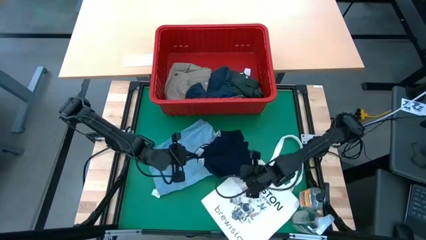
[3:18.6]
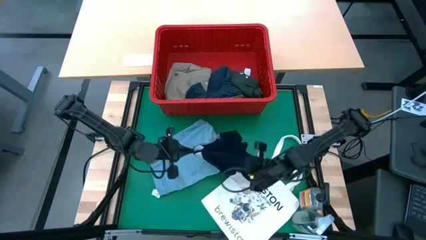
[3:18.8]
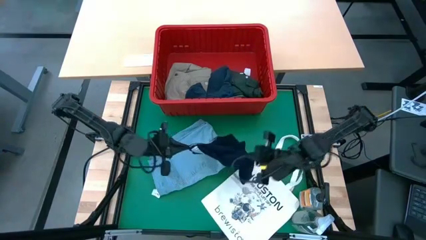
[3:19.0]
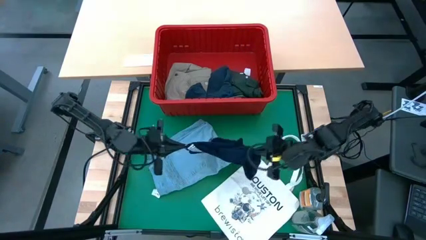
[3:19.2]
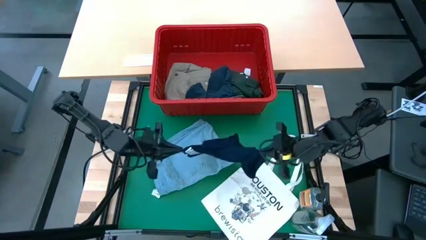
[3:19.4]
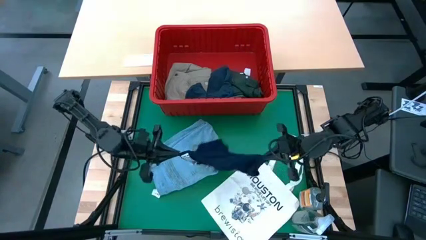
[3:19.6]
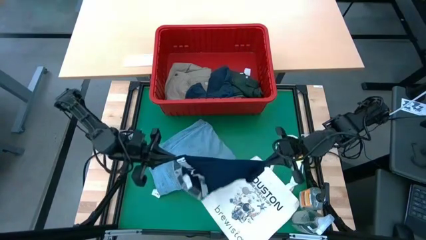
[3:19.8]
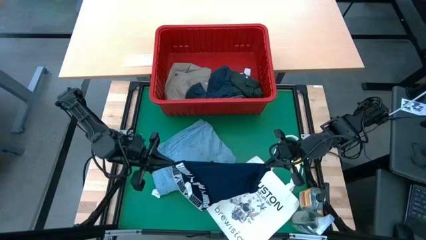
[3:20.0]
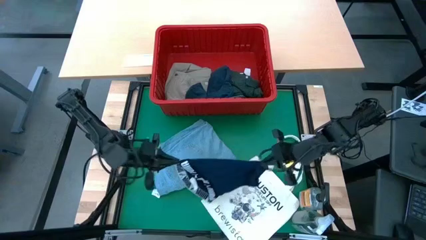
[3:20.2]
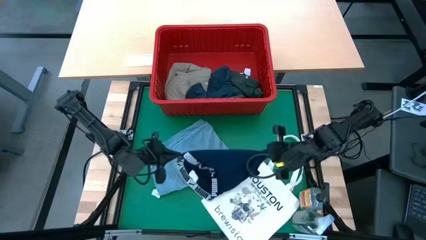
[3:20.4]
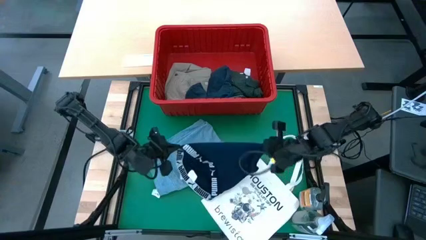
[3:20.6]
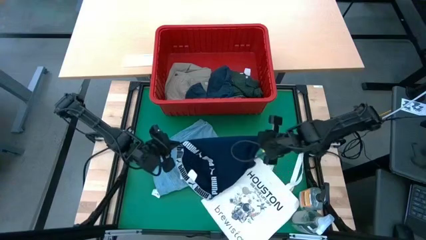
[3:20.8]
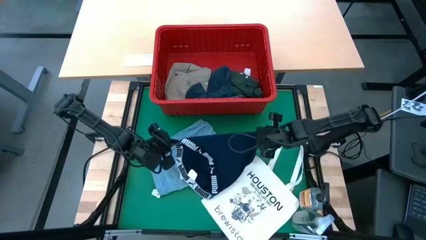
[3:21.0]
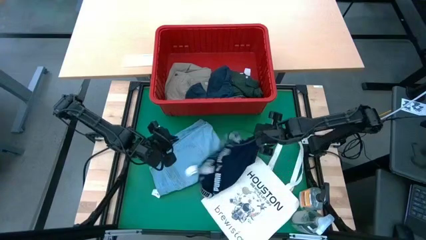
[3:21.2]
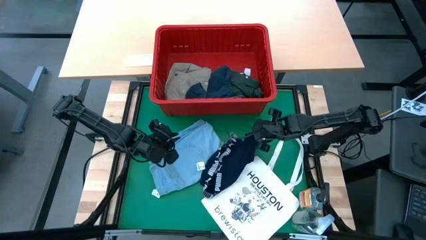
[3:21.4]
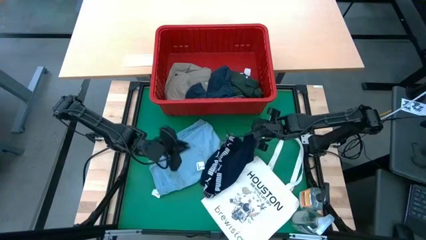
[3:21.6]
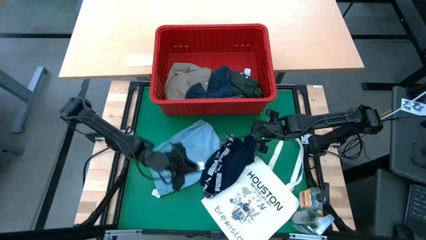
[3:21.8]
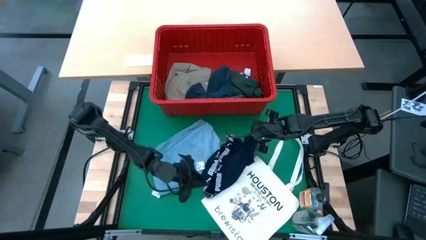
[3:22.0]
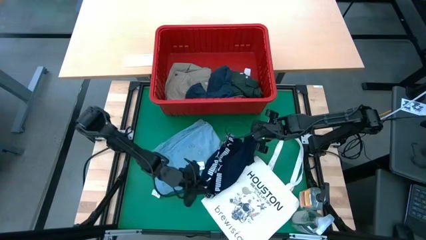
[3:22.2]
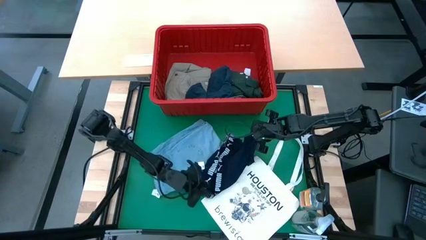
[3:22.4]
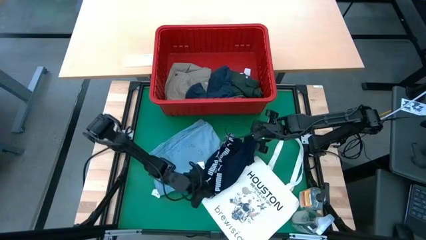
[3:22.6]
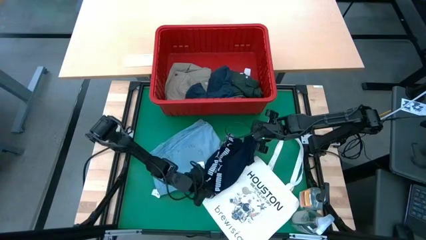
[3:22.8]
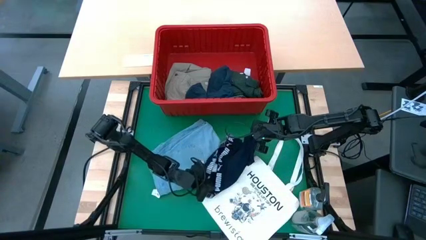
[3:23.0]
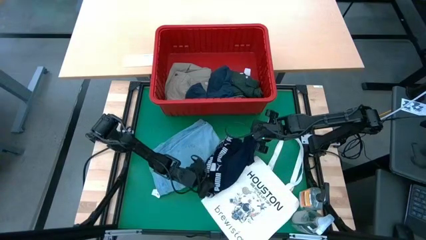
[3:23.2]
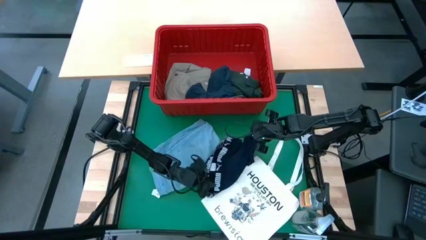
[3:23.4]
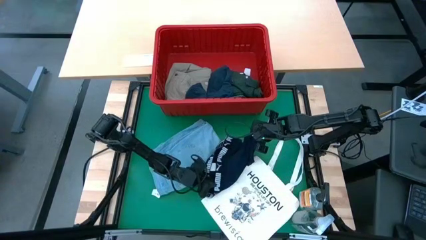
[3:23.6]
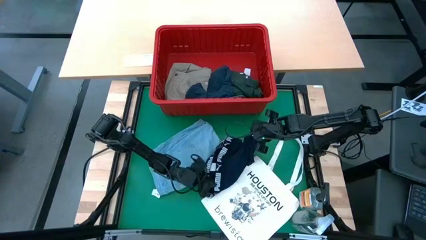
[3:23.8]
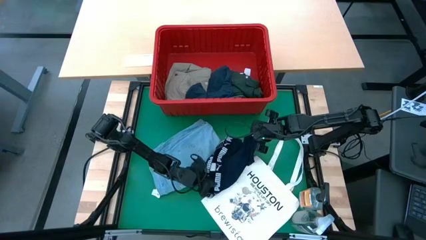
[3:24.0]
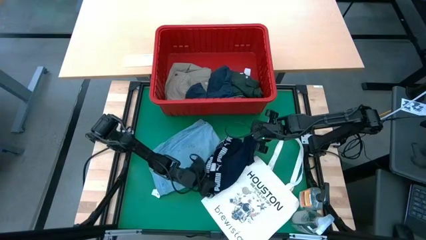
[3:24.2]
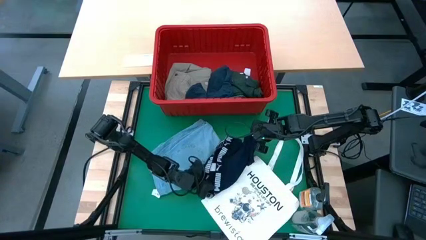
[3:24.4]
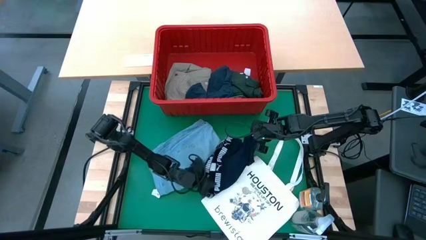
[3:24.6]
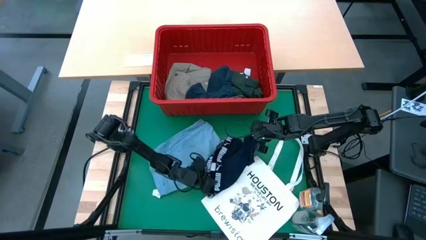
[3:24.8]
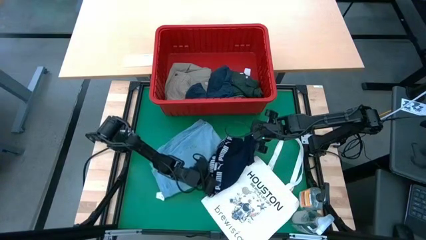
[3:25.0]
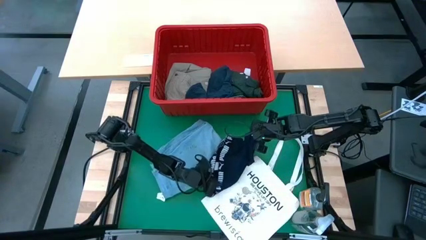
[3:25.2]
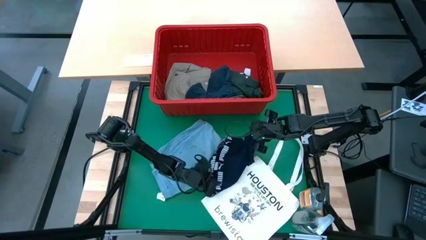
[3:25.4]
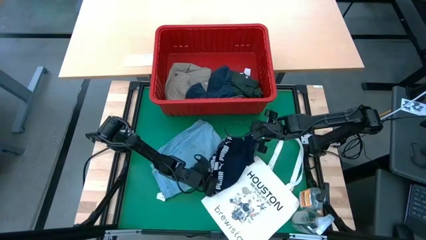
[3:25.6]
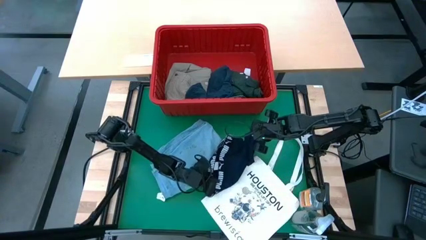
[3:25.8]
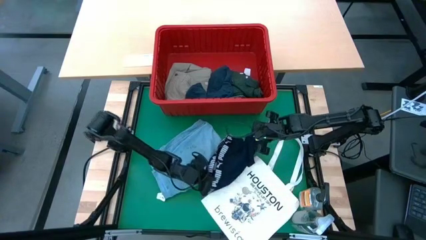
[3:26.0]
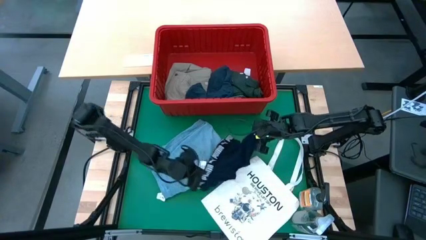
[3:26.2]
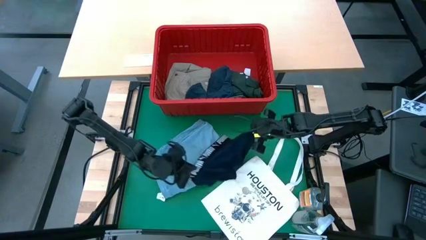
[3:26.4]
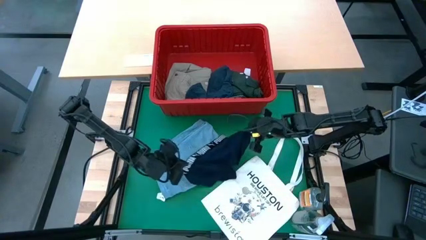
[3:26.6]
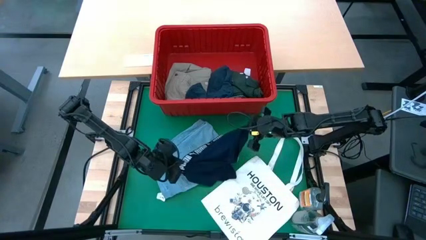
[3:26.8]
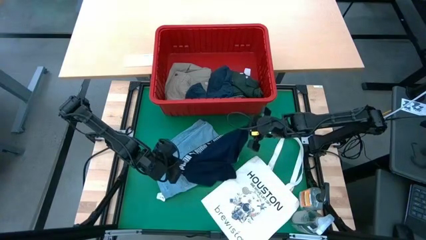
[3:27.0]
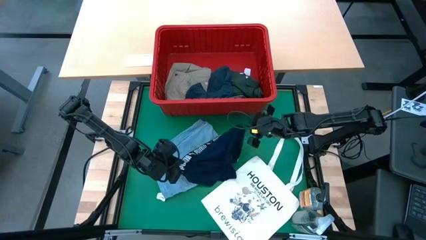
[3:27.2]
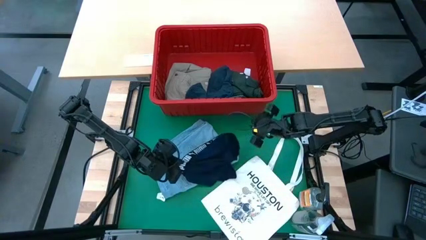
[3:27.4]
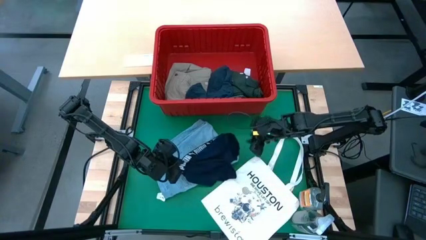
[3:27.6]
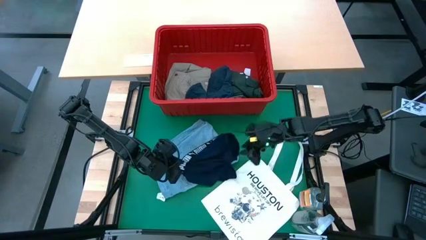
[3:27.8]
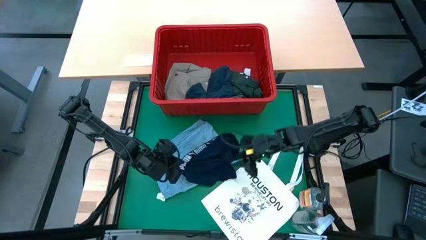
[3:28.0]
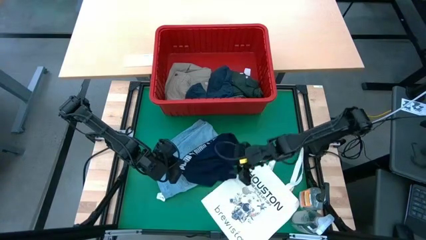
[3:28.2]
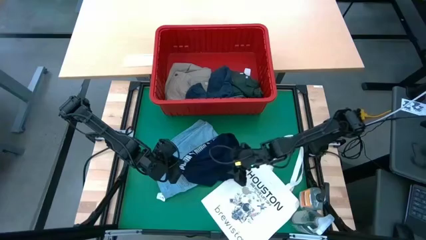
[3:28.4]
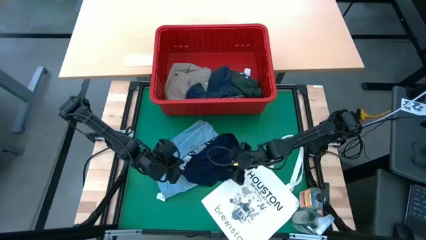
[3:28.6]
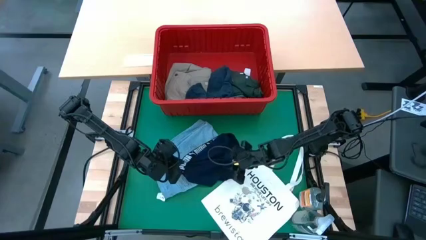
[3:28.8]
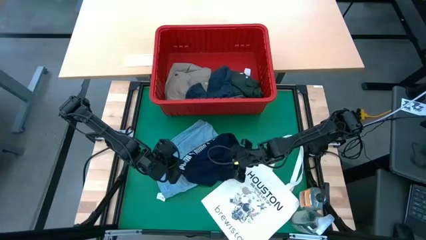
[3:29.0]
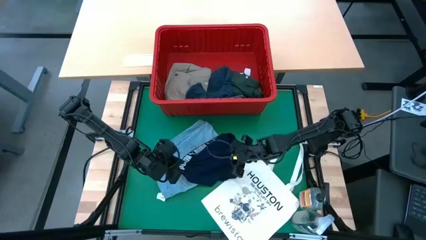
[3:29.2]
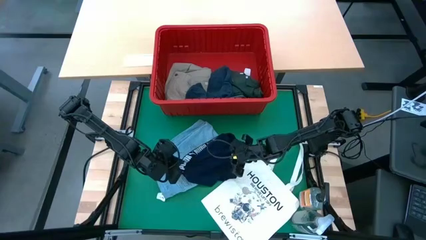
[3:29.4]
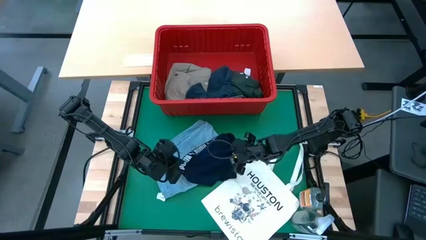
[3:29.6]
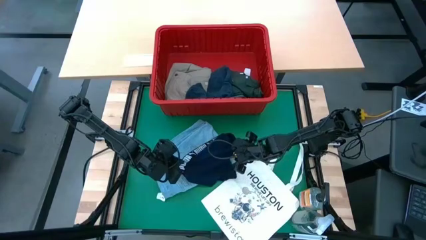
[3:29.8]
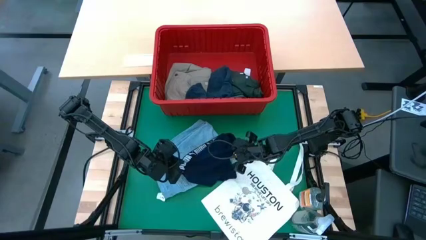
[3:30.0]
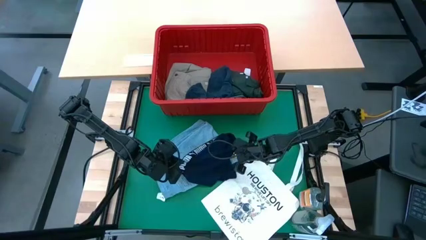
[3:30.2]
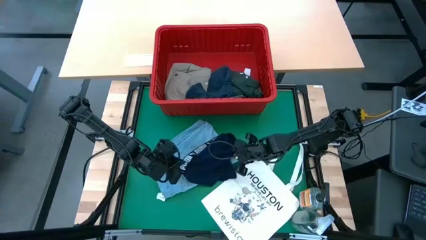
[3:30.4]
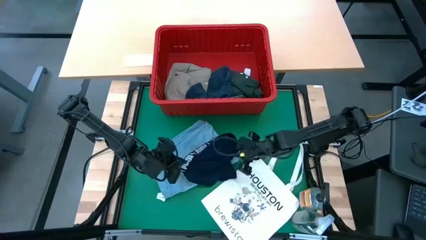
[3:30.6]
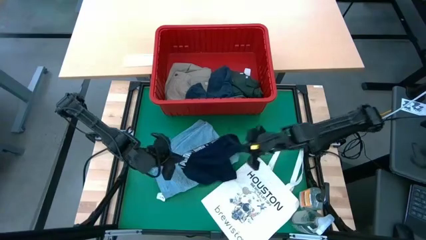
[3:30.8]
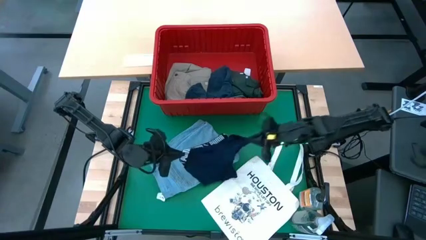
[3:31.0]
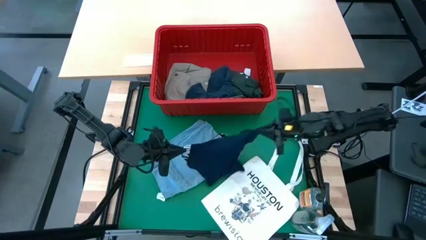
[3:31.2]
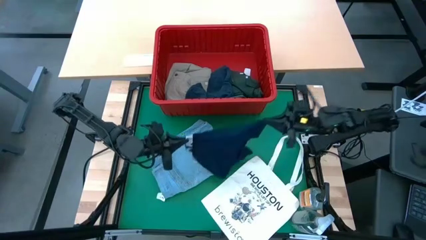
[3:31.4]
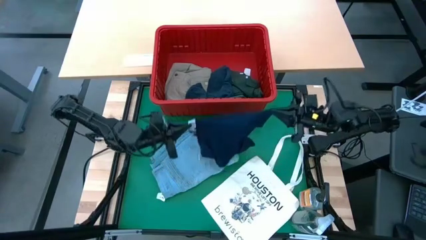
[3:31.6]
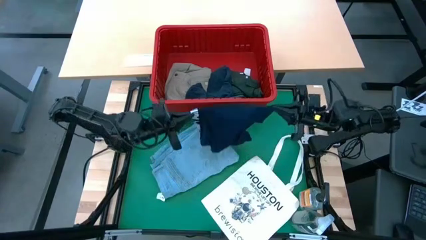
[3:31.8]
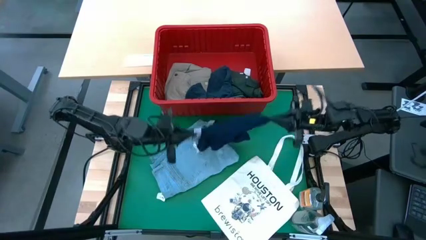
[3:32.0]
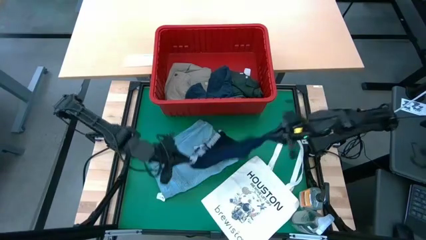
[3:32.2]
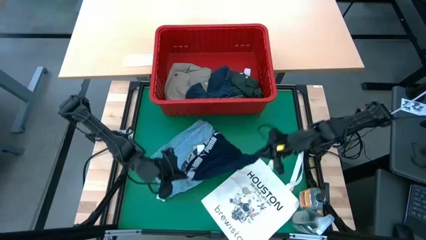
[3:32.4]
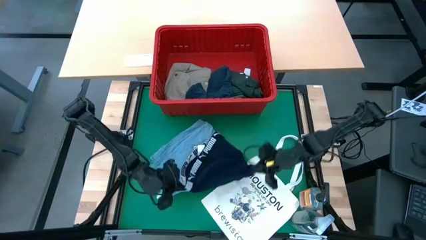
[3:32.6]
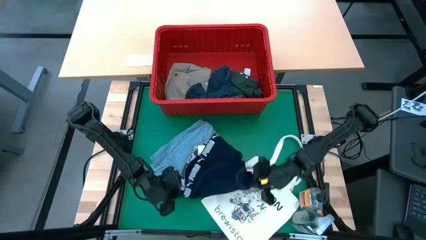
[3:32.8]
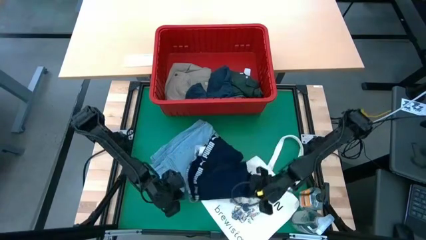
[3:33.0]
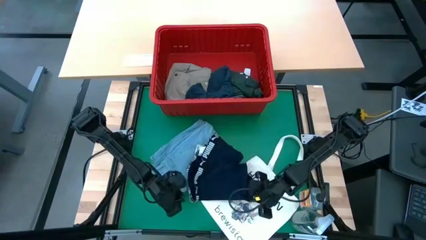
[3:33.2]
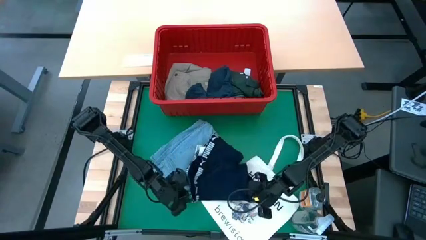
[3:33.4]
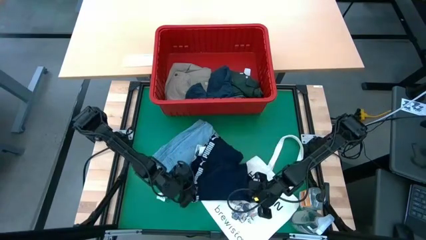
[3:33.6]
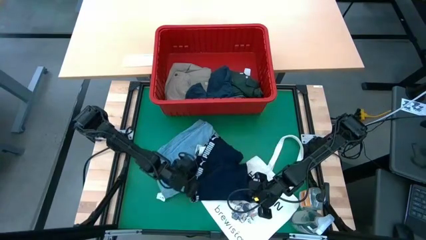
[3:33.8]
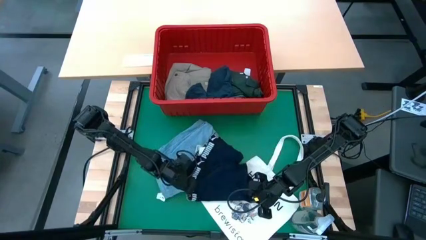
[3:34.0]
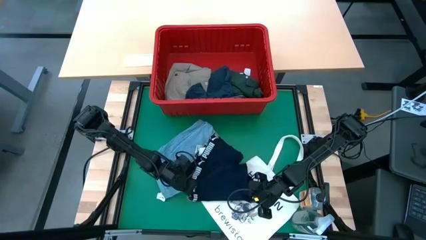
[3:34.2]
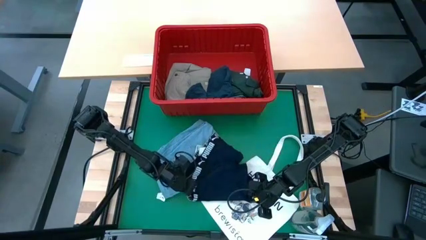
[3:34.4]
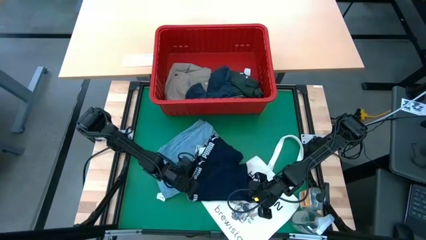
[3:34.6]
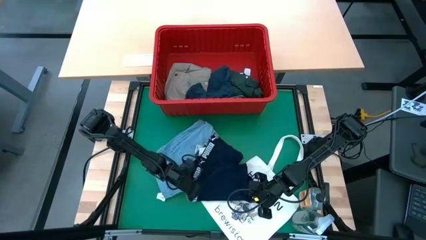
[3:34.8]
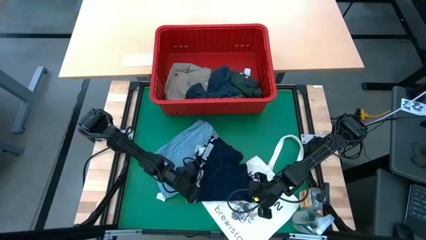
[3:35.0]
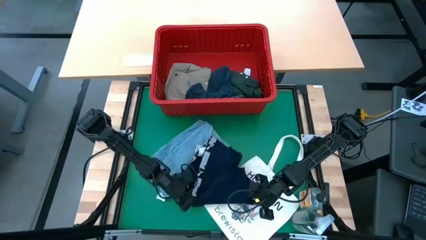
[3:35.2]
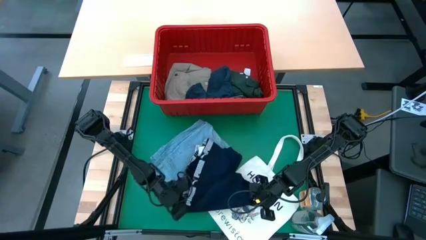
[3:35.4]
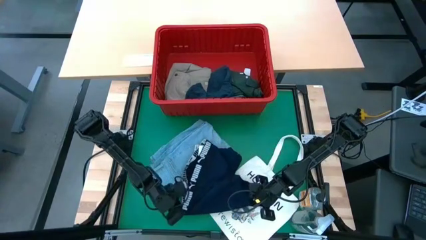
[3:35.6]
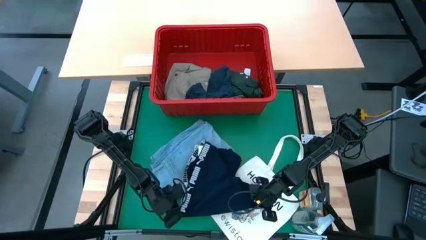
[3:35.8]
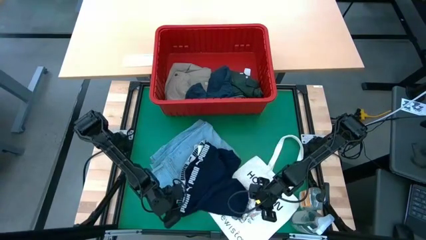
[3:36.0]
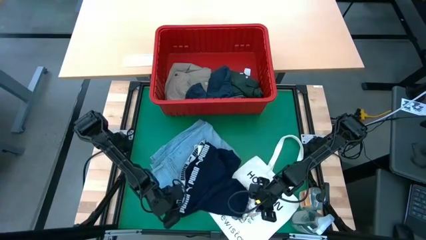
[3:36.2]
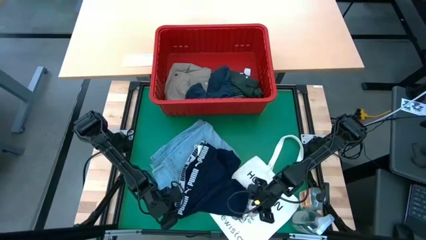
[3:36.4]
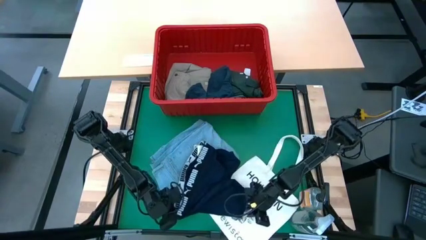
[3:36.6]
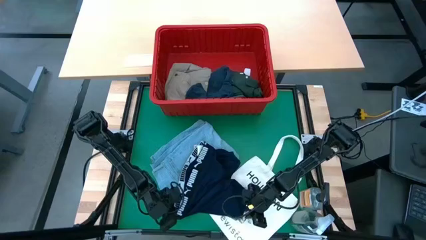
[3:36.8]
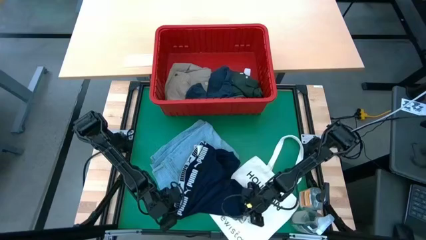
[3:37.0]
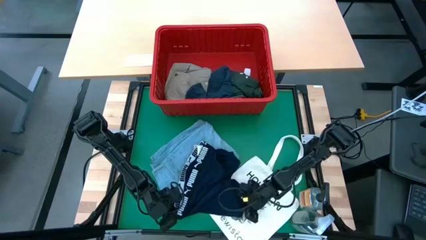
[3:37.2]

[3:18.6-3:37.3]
Task: Fold Laundry from Bin
Fold the dark blue boxer shorts
